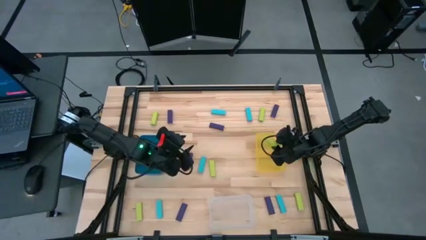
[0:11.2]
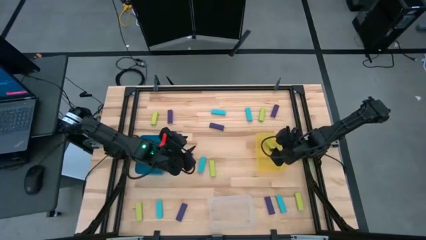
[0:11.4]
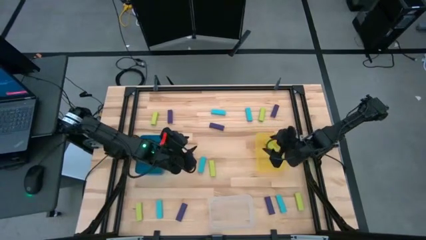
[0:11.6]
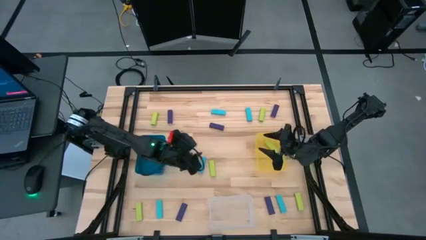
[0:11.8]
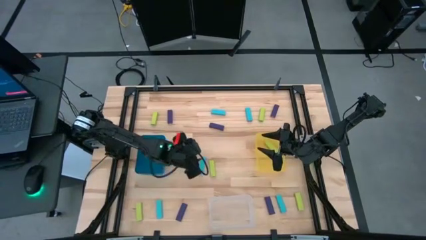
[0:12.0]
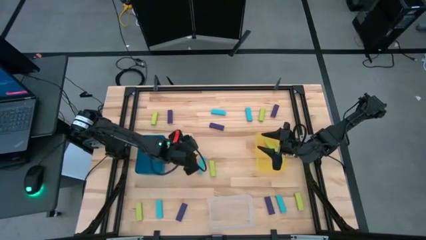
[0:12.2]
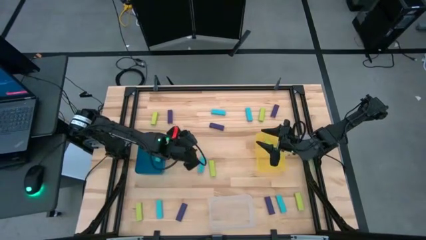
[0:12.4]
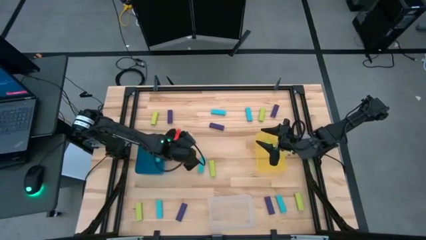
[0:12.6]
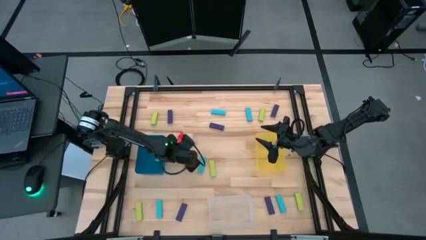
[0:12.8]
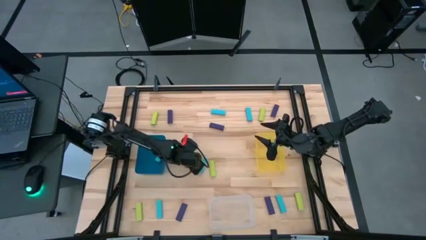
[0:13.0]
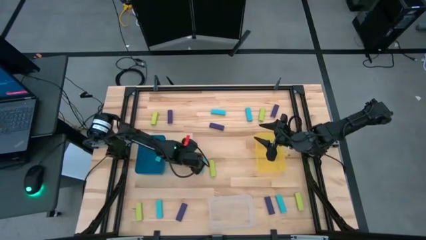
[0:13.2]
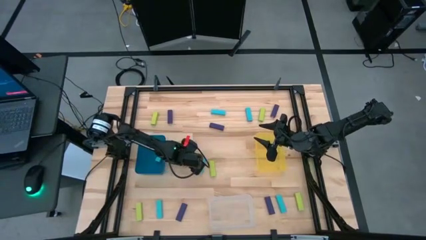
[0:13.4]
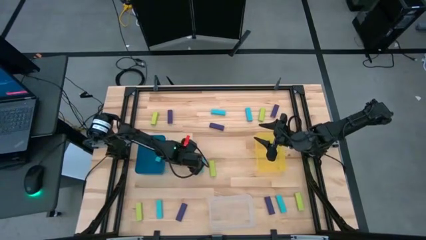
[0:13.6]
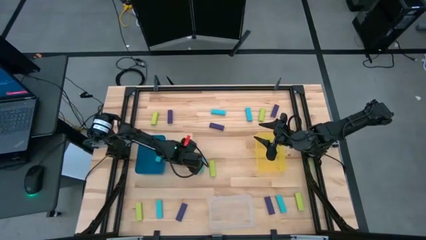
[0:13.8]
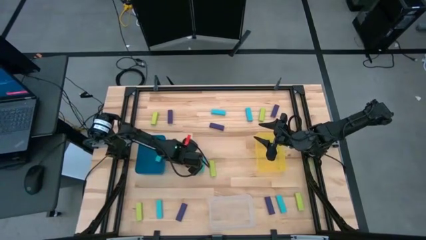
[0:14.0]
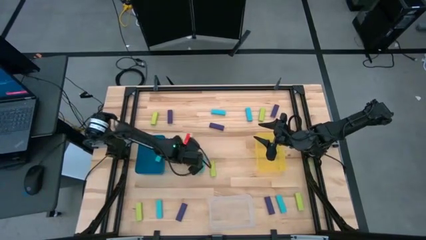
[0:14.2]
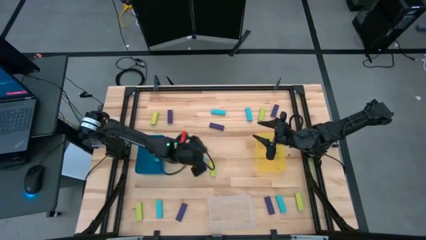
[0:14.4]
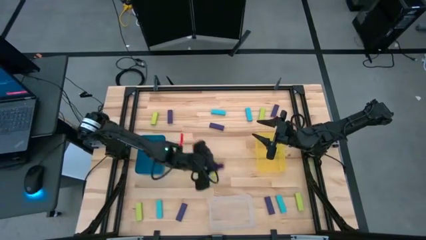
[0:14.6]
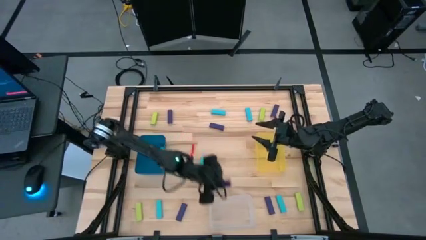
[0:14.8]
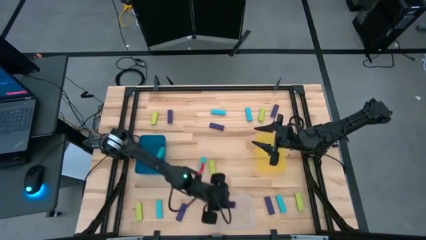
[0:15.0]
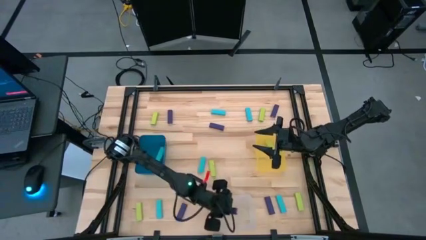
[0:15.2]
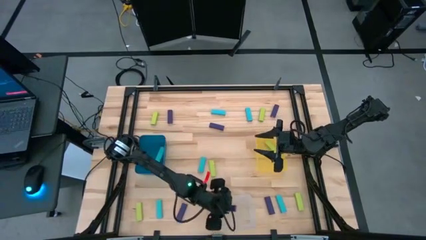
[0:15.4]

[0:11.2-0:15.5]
Task: Sort blocks
Put the violet block into the transparent bin

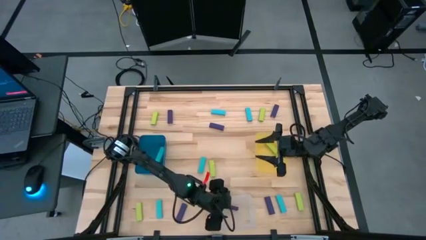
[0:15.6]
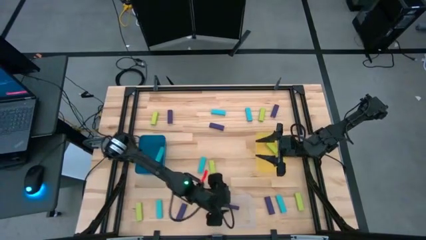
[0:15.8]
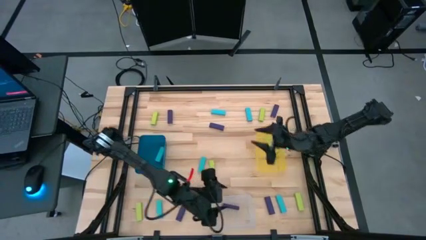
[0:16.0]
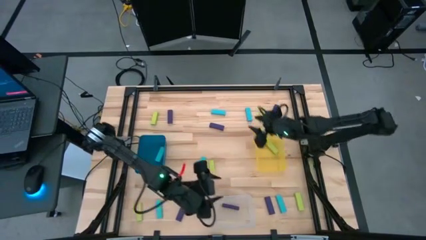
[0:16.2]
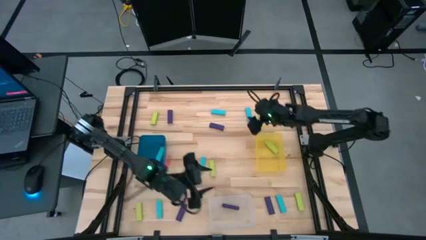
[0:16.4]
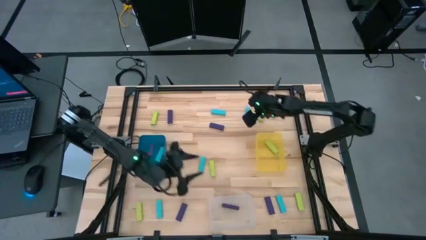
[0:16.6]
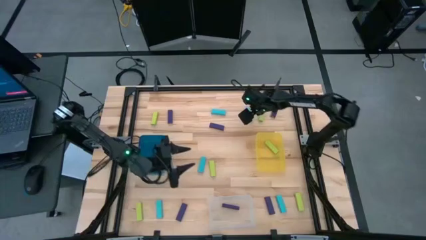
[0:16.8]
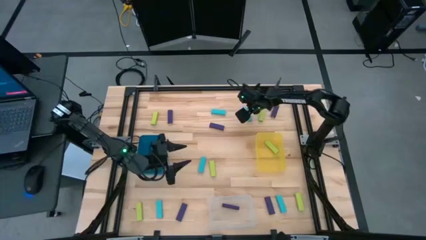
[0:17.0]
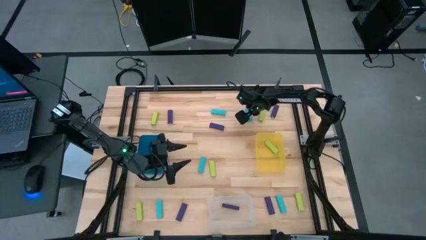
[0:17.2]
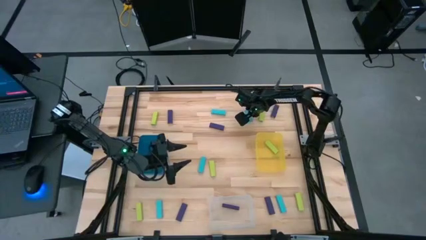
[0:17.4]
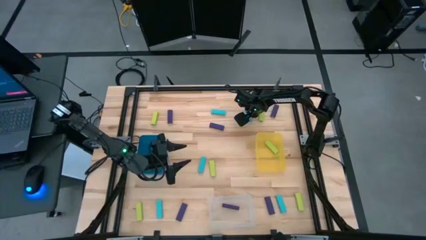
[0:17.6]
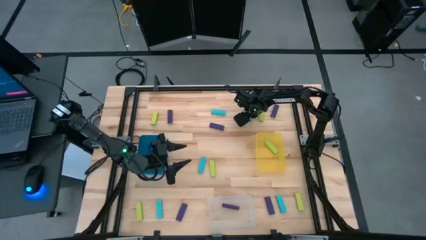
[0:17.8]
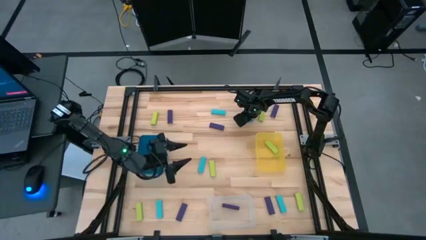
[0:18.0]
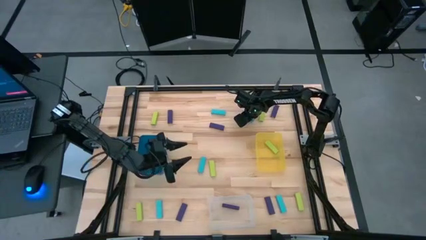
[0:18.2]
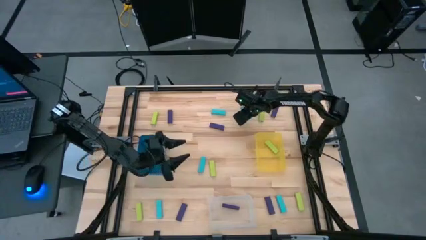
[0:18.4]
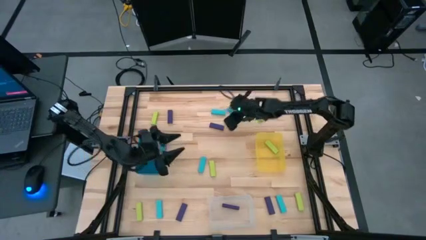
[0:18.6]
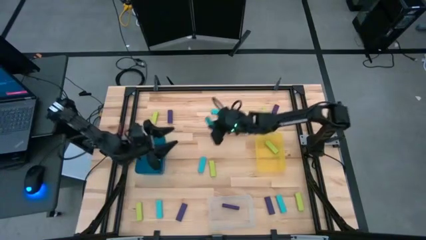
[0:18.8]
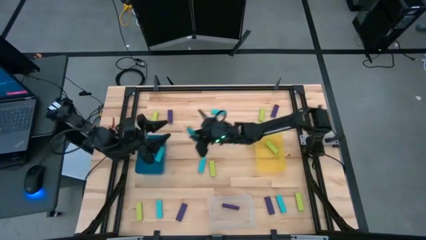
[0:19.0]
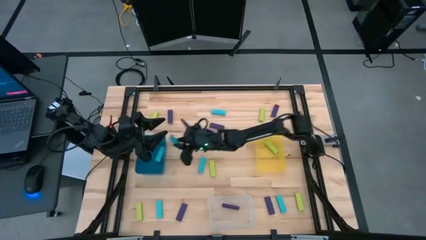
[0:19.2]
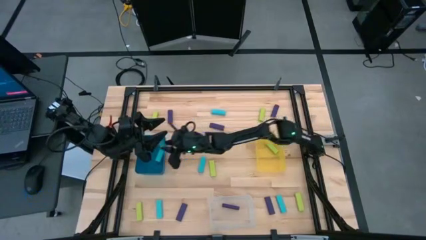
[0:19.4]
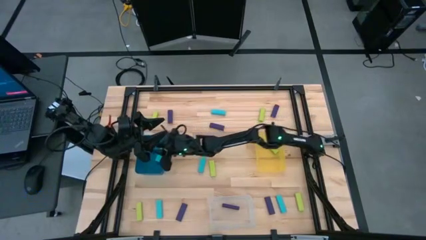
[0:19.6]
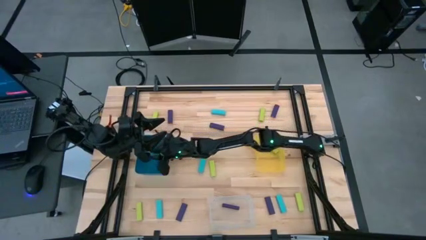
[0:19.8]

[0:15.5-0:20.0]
Put the light blue block into the blue bin

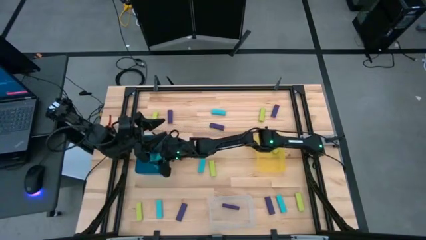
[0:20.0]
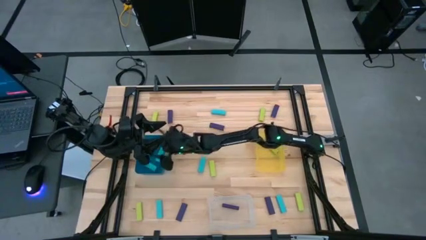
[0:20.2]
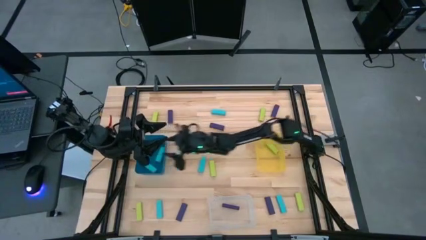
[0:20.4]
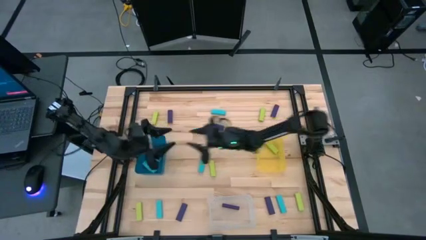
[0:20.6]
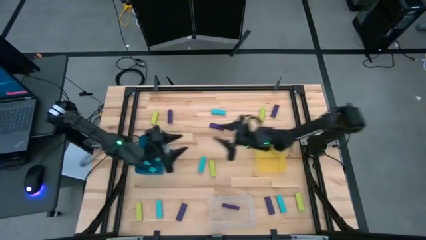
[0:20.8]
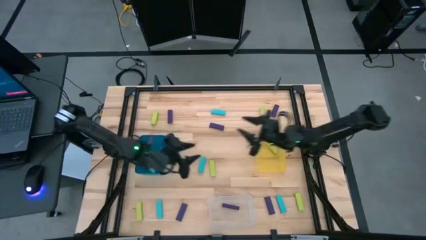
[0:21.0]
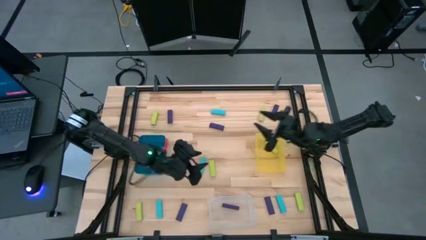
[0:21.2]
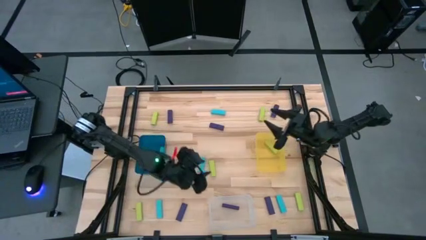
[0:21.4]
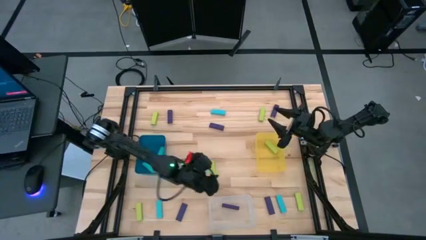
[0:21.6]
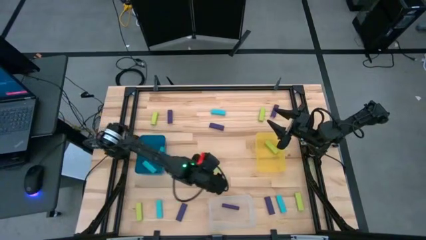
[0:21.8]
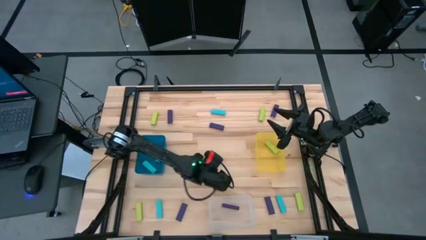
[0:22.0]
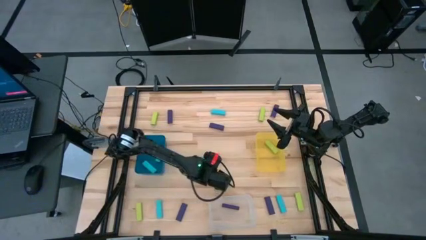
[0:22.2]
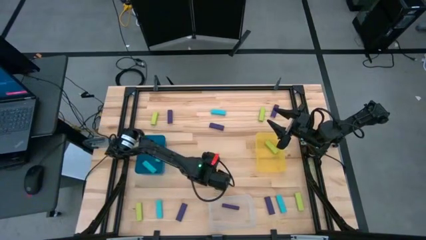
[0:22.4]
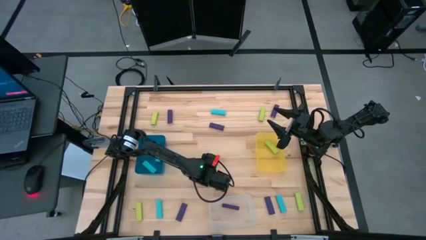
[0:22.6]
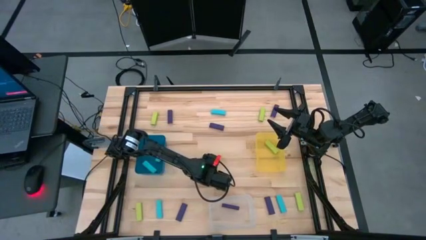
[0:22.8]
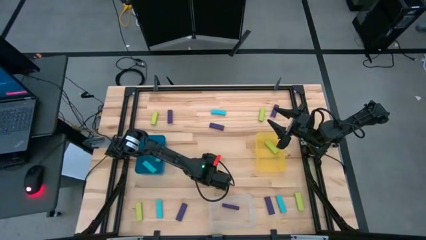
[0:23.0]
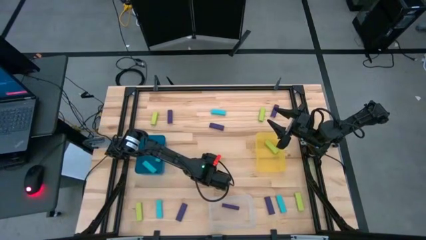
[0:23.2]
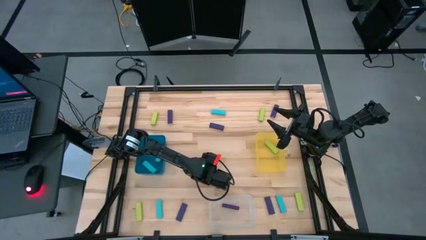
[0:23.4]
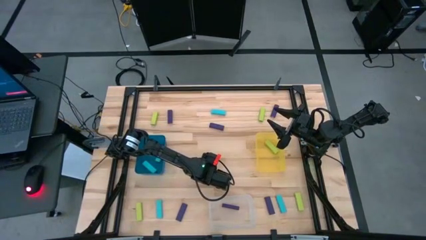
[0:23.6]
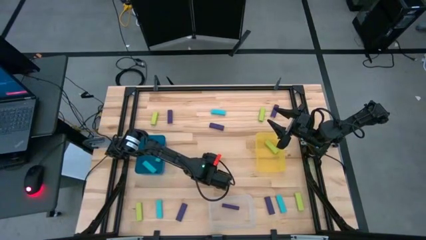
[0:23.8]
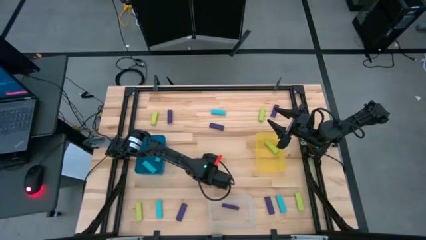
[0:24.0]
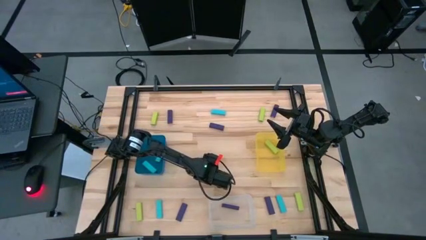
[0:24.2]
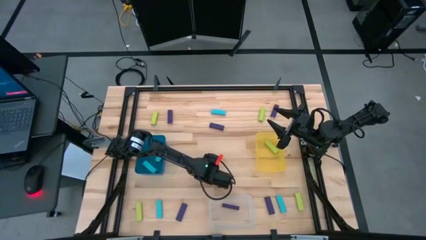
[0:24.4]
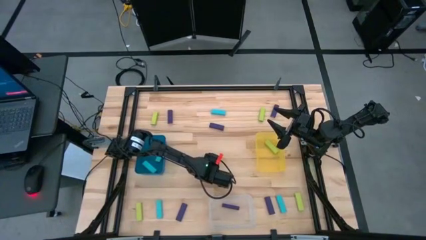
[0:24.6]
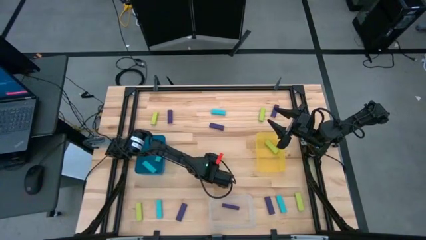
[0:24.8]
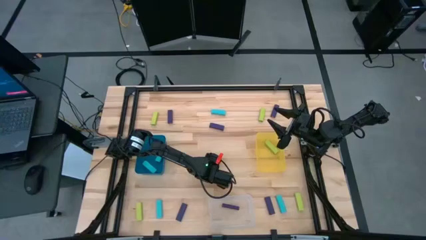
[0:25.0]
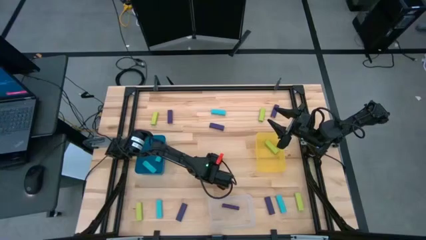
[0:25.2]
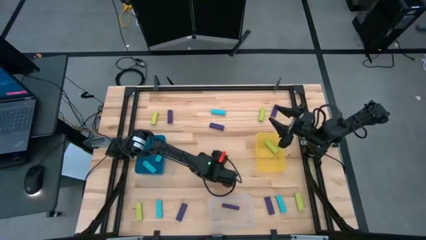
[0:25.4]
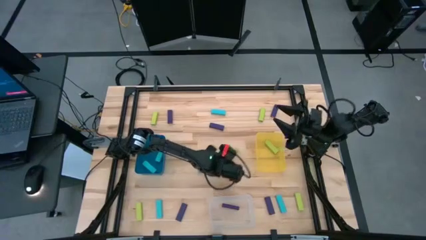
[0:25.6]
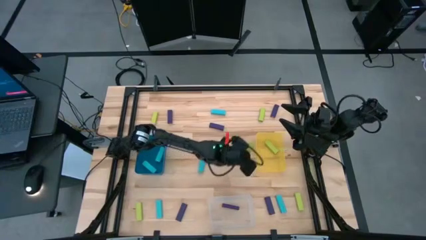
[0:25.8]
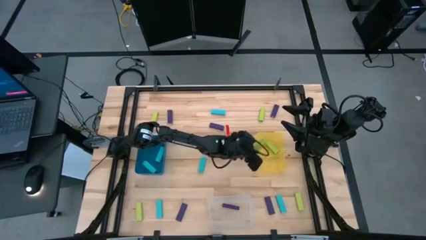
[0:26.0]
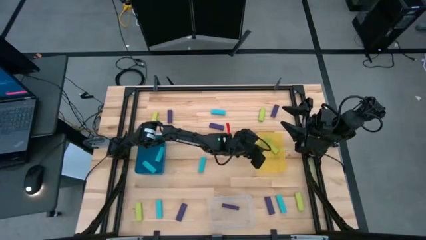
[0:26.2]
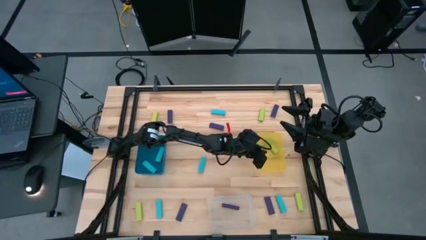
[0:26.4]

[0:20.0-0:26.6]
Put the green block into the yellow bin

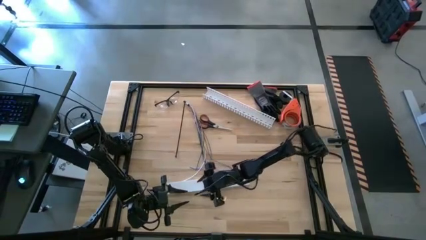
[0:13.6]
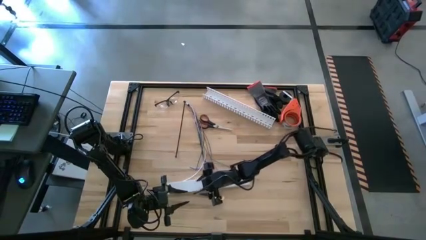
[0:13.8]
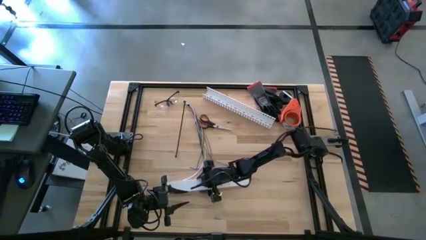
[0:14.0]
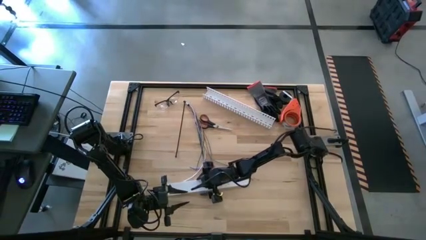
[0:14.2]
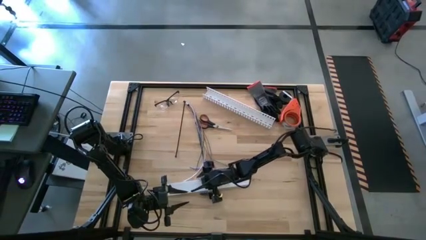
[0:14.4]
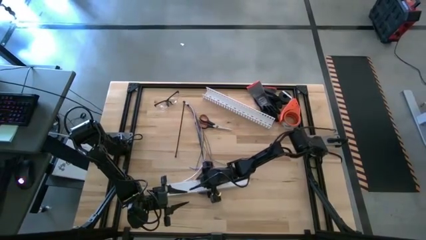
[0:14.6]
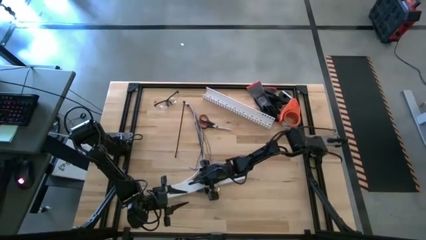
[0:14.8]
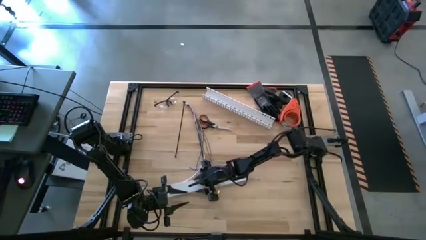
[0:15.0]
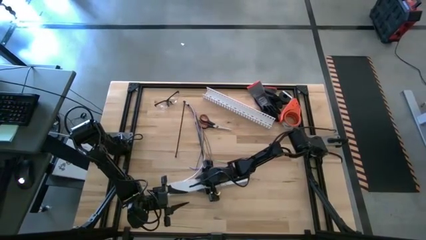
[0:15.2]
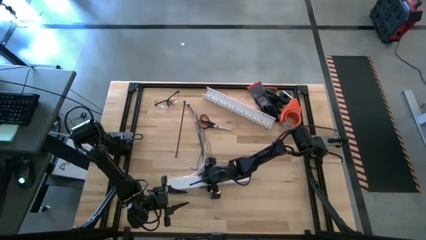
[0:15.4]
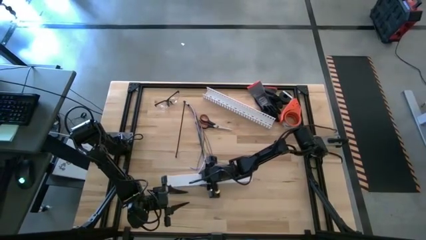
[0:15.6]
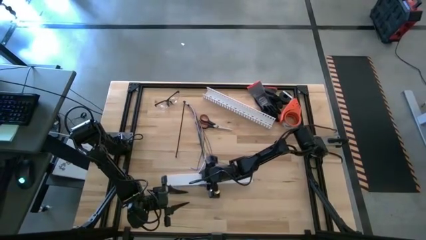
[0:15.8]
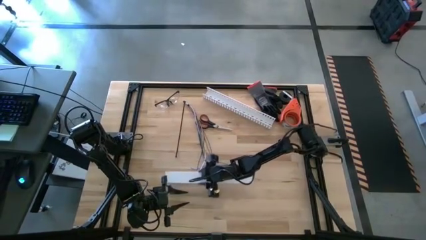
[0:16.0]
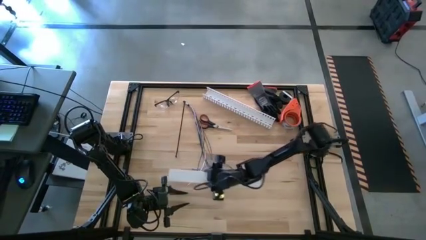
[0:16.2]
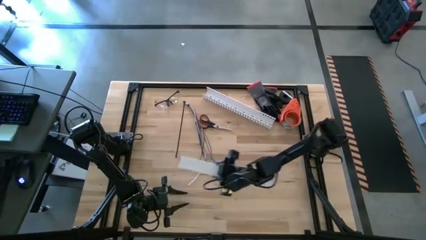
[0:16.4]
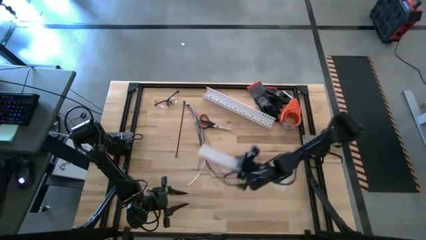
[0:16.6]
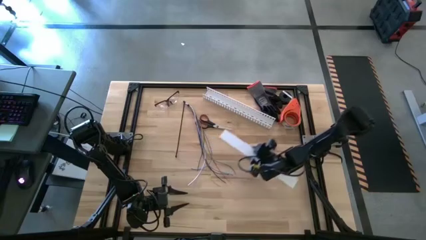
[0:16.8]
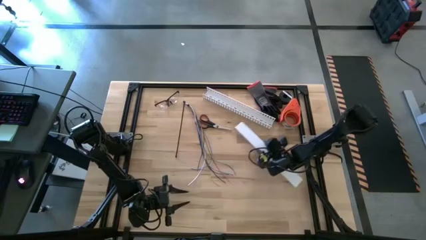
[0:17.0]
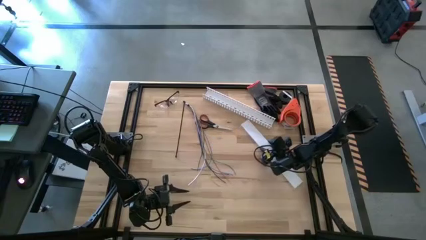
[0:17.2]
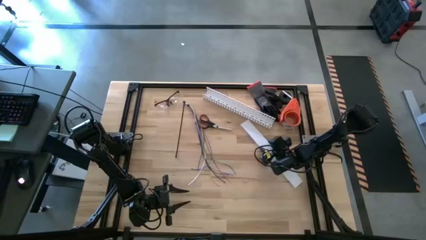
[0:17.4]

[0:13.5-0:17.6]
Task: Ziptie cables
Move the white cable duct lid to the middle right of the table
